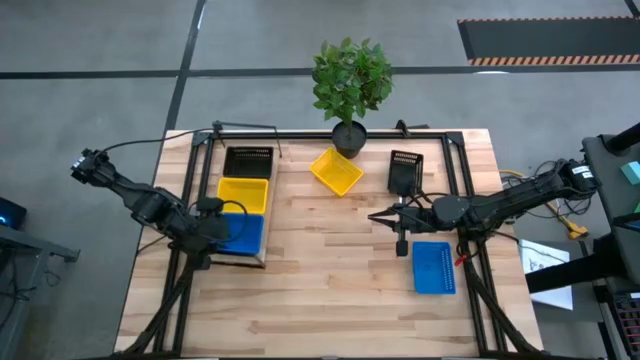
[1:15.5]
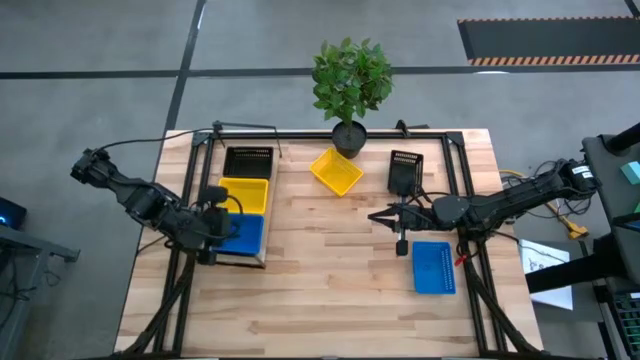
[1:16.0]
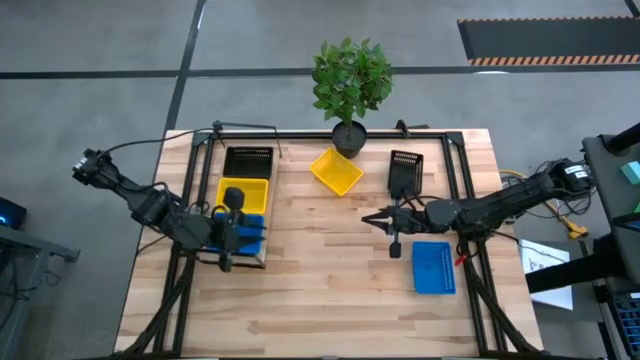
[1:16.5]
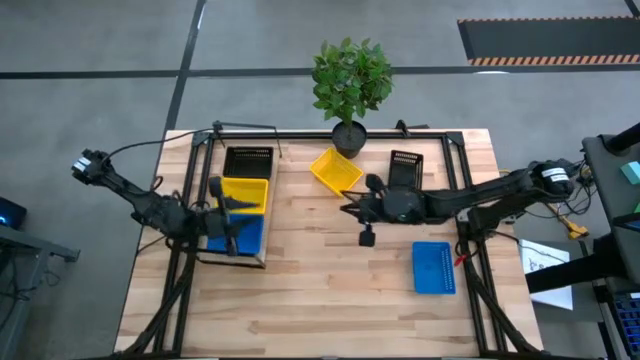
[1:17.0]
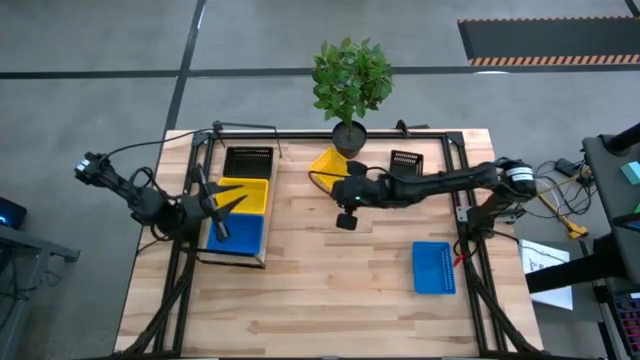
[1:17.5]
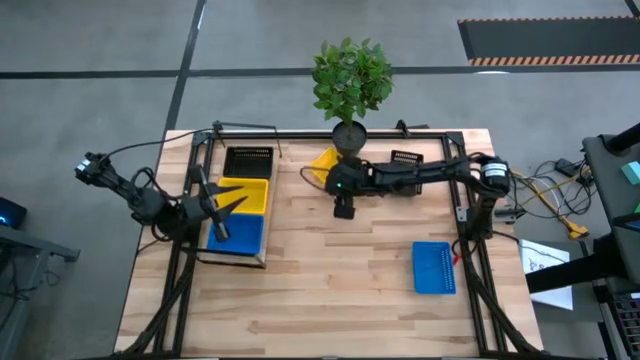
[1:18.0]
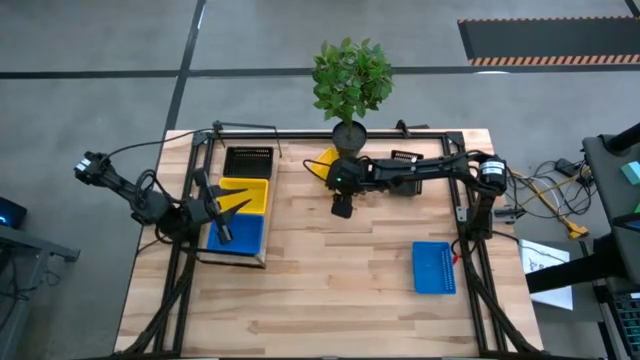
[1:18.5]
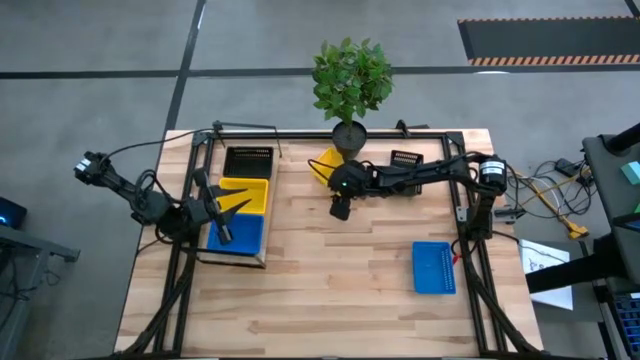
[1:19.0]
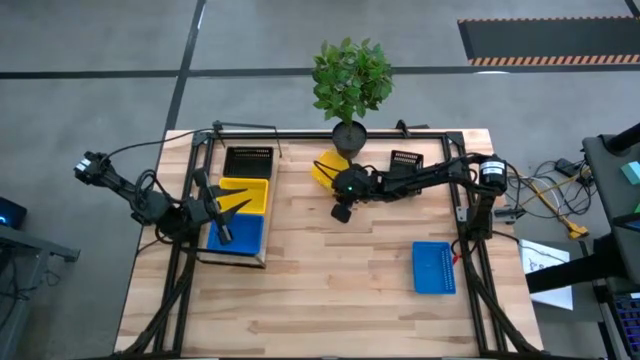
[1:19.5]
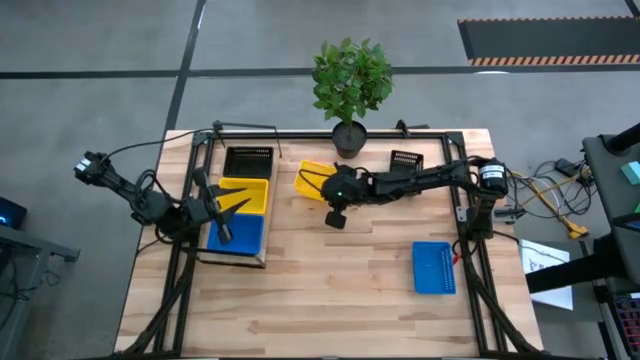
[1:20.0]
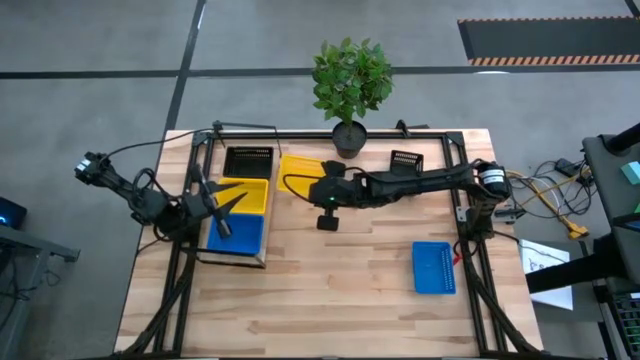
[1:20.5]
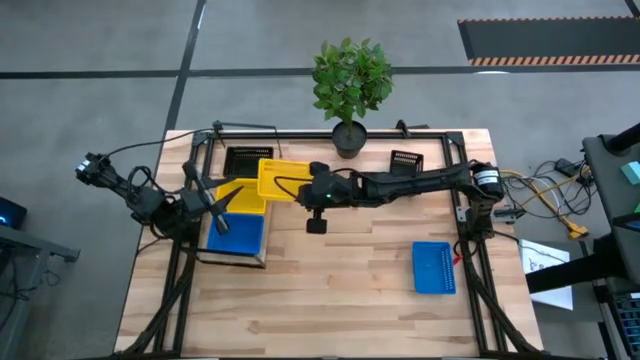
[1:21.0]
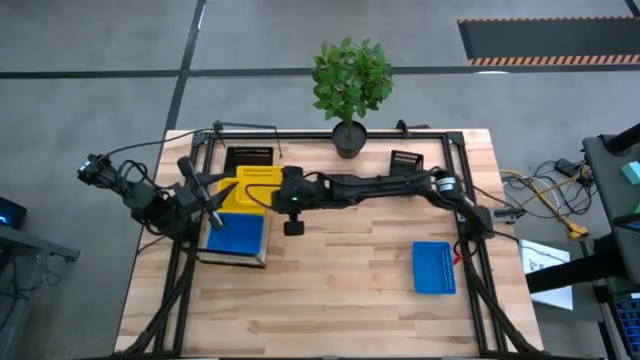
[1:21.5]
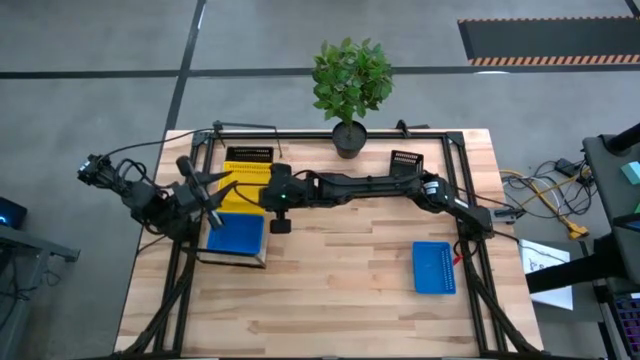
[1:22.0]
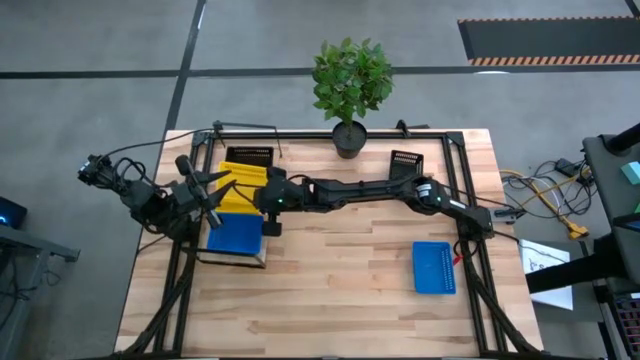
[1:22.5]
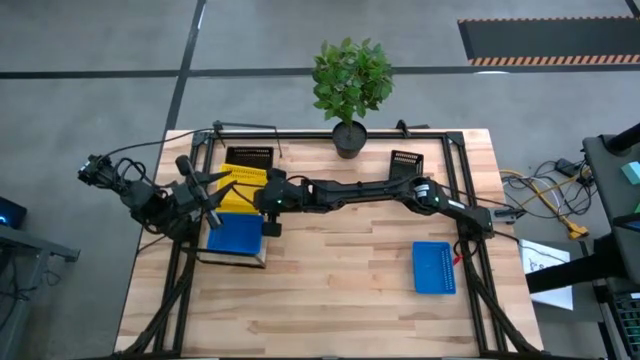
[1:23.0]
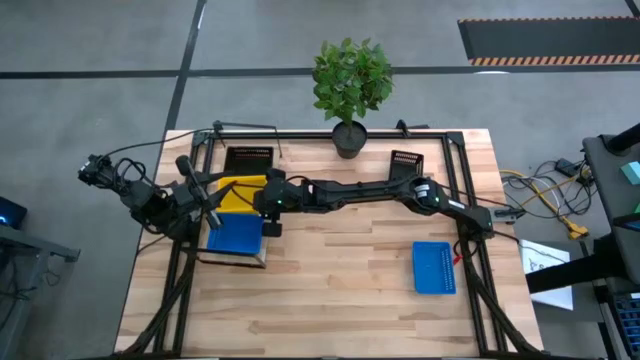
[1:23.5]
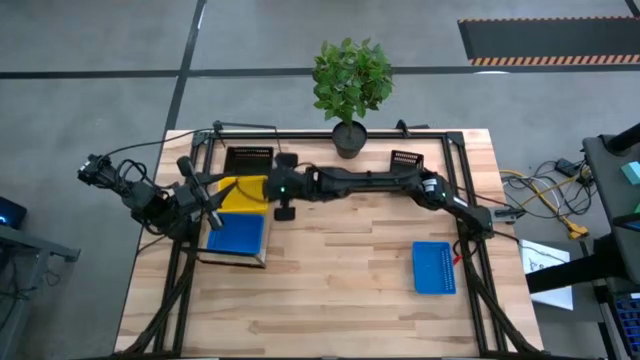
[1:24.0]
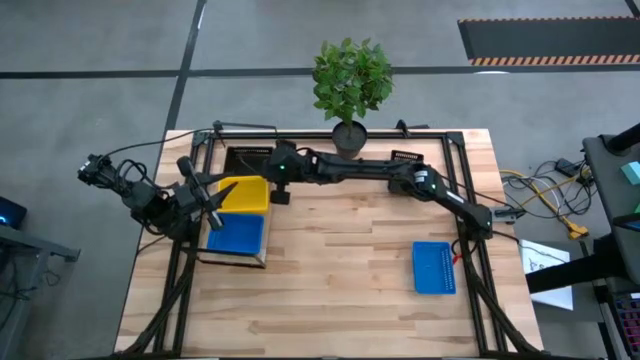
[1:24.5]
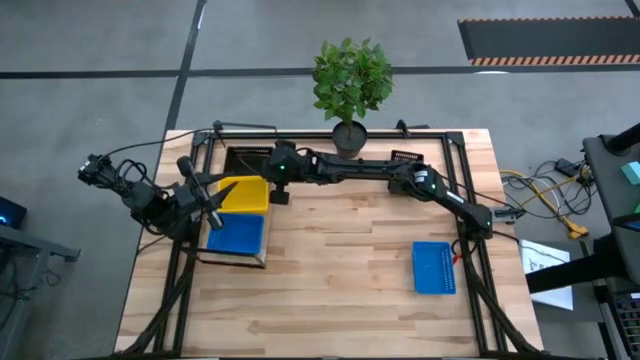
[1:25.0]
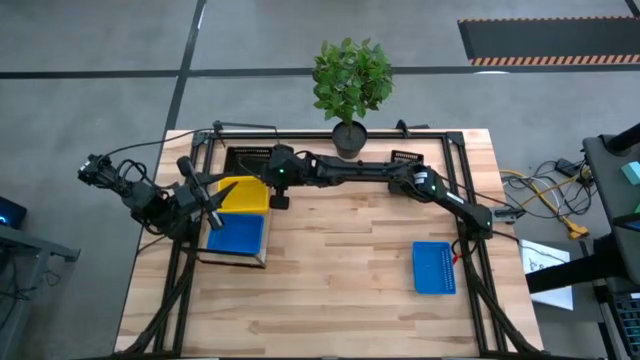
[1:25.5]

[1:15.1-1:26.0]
Stack the yellow basket on top of the yellow basket on the shelf

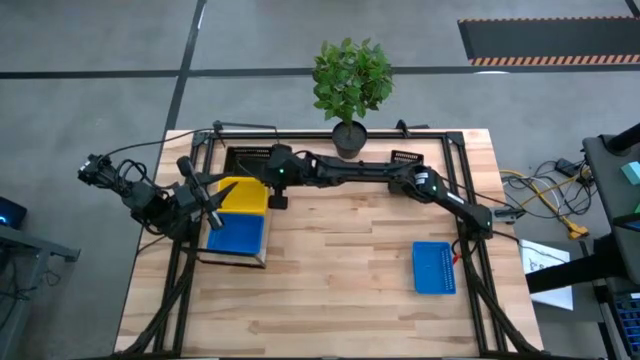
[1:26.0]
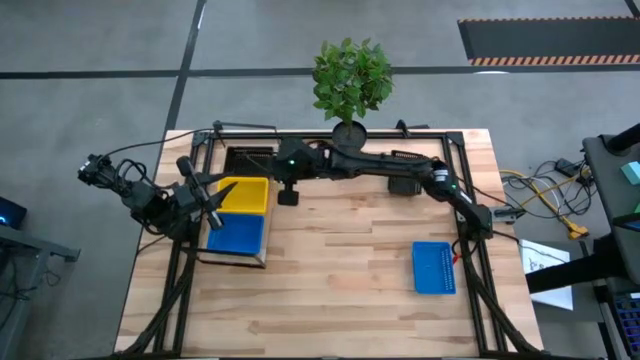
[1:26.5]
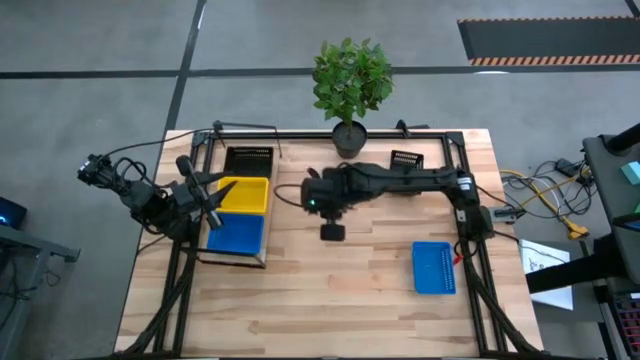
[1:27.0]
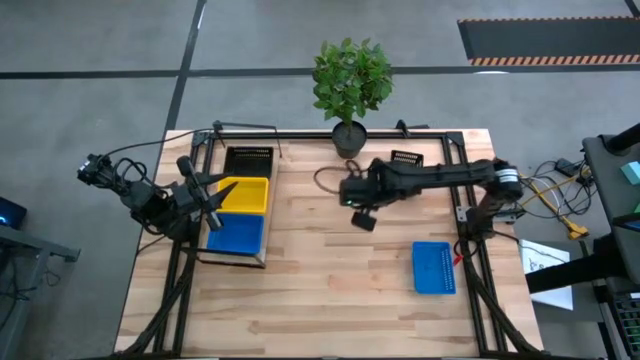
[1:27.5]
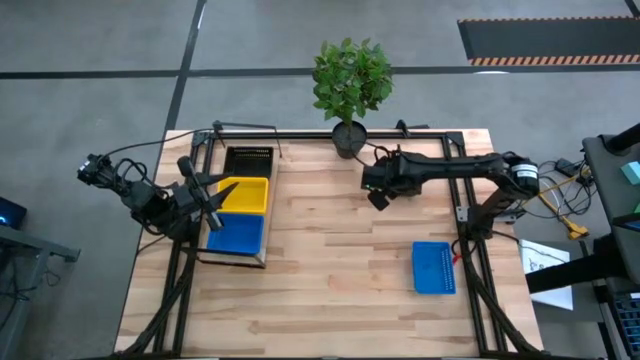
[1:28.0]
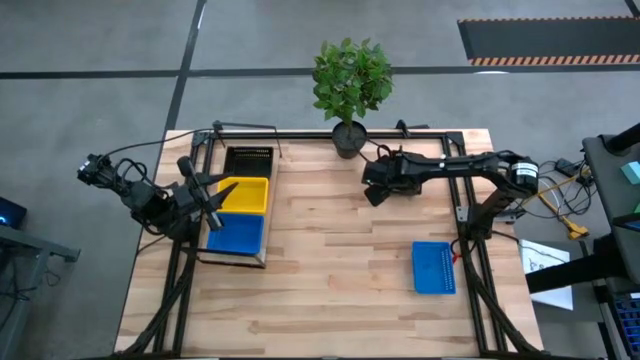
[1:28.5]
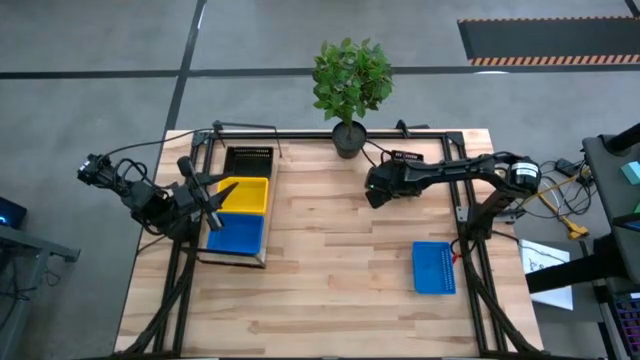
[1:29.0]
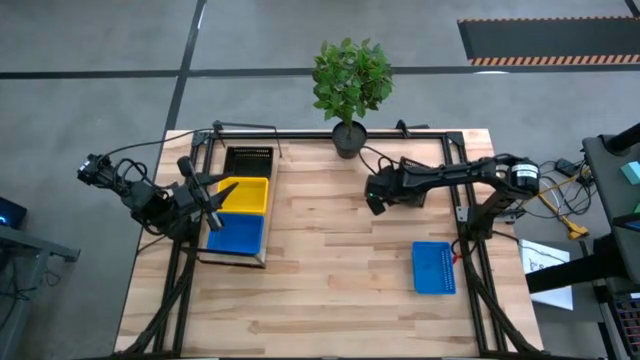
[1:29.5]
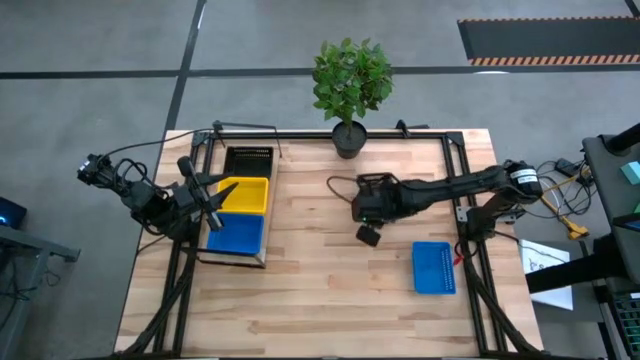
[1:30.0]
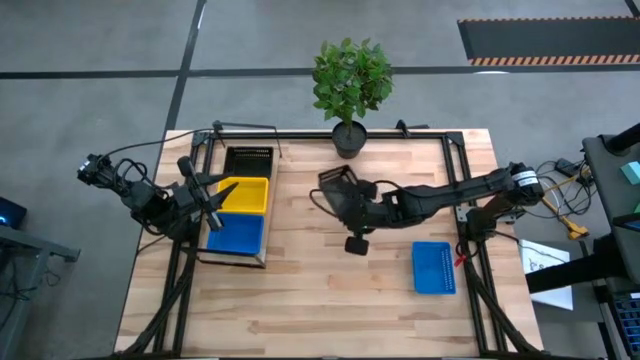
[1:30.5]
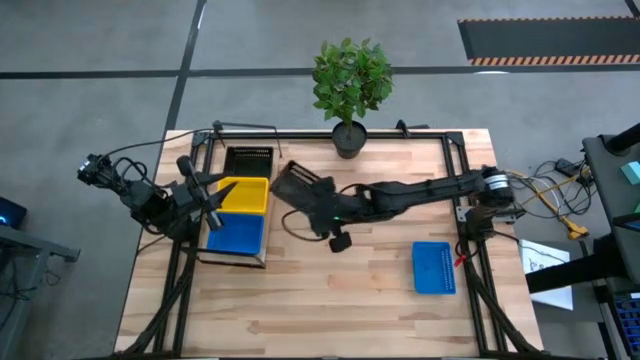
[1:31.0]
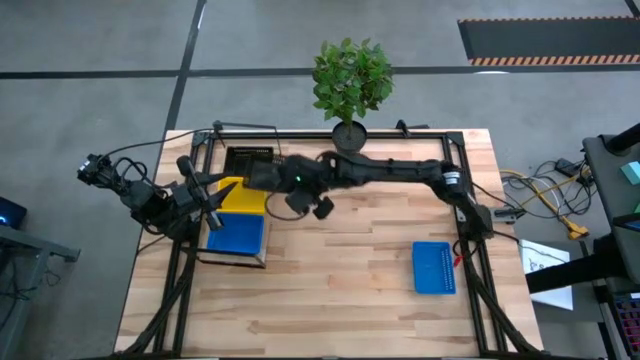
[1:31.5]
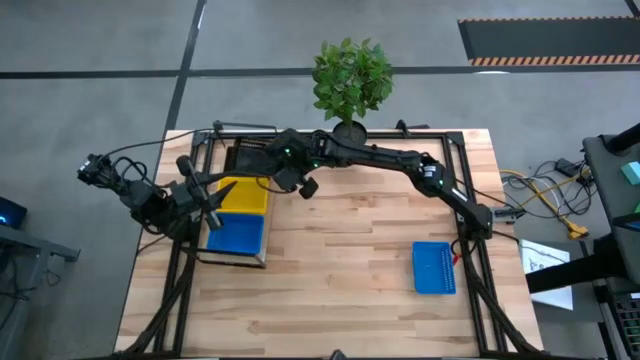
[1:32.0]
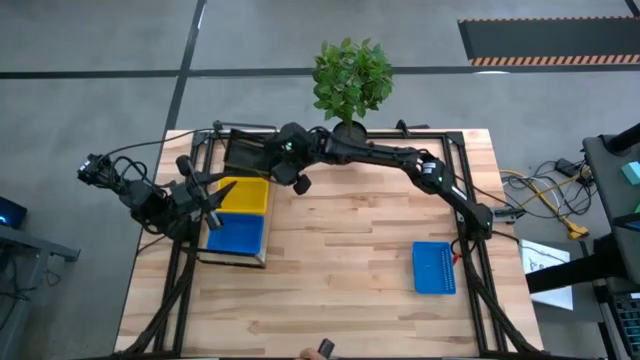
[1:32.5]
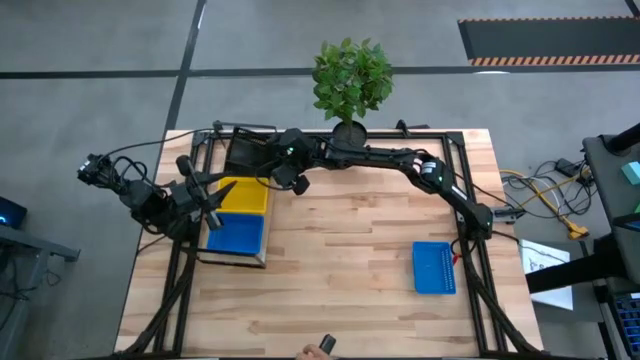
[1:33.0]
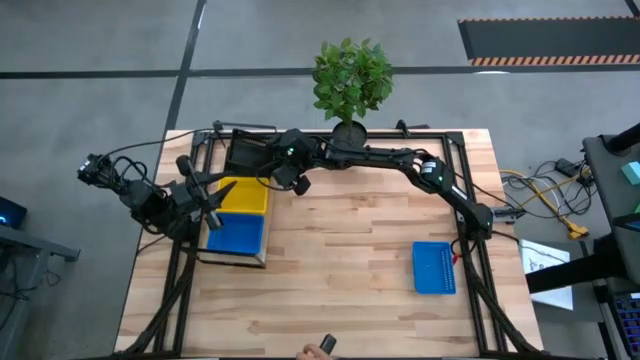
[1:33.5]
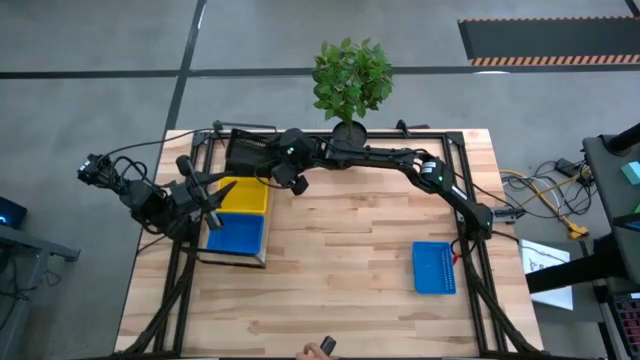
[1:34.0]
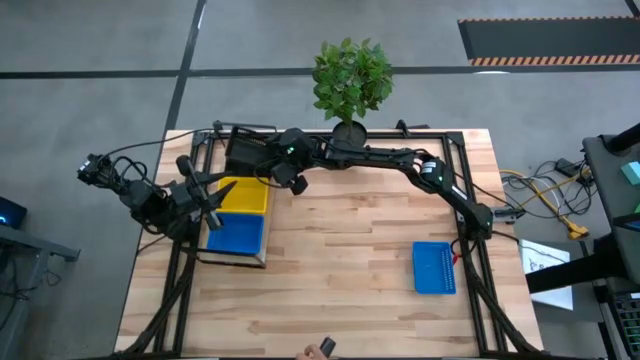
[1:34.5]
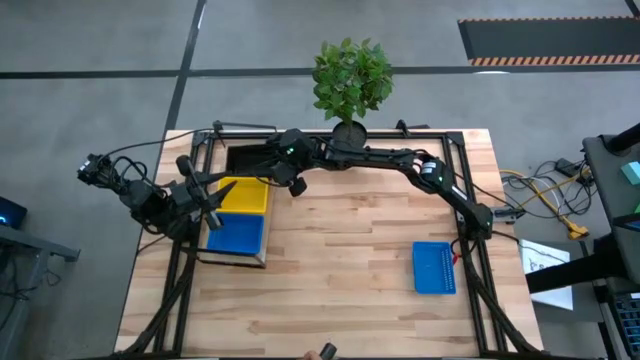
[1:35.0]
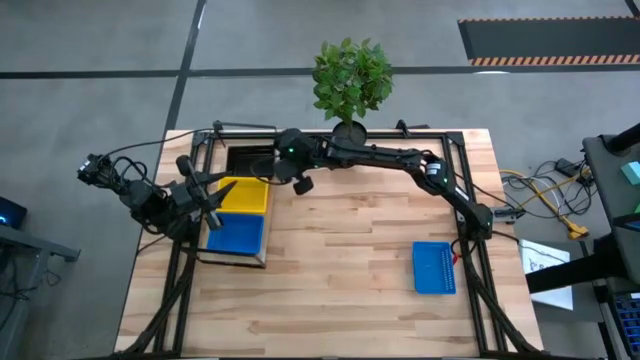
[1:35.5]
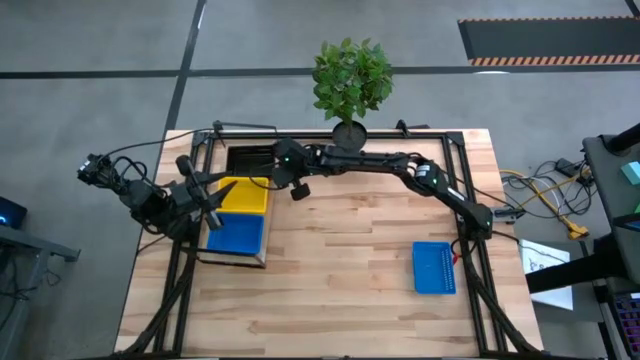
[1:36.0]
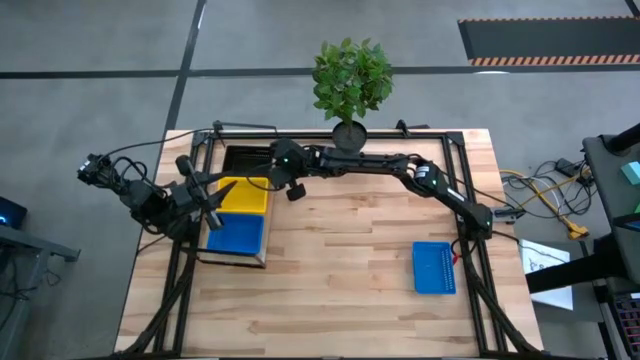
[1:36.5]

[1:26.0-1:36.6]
Stack the black basket on top of the black basket on the shelf
